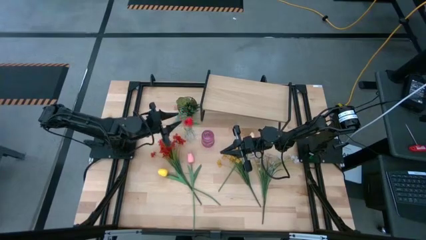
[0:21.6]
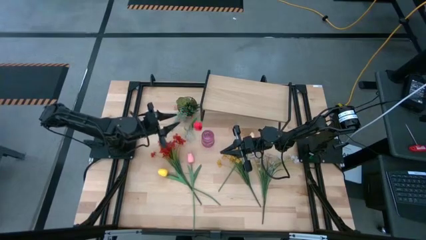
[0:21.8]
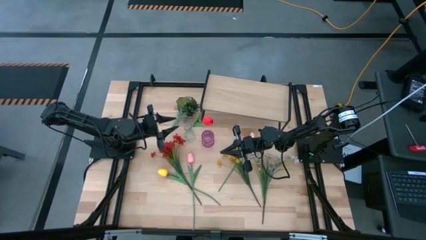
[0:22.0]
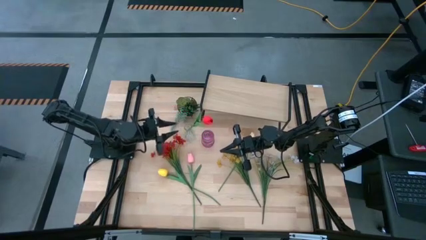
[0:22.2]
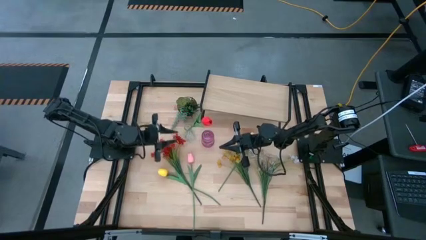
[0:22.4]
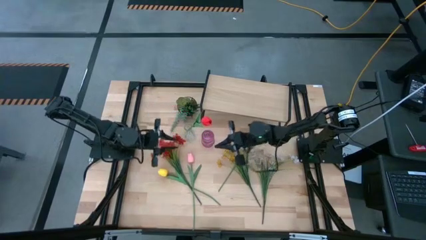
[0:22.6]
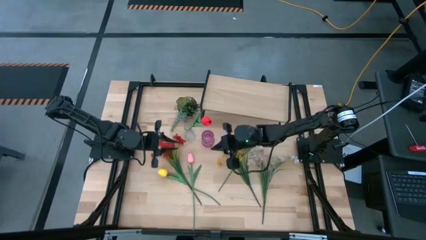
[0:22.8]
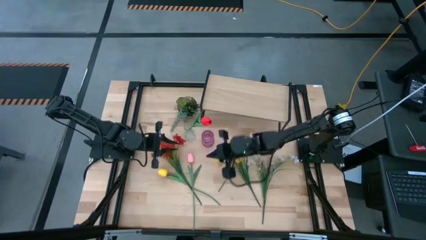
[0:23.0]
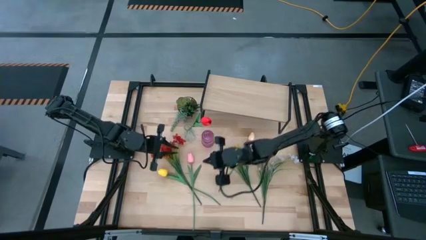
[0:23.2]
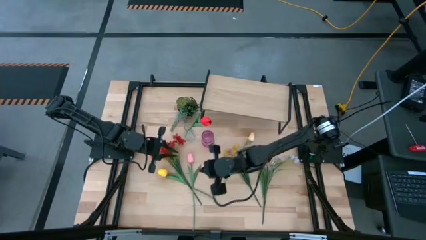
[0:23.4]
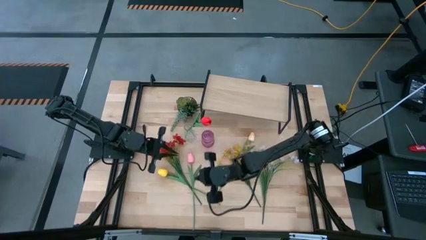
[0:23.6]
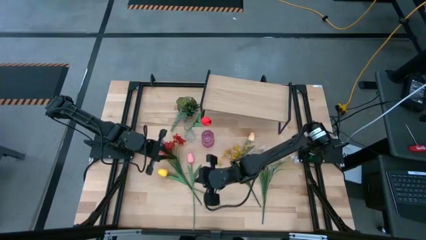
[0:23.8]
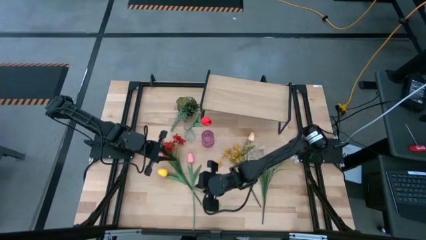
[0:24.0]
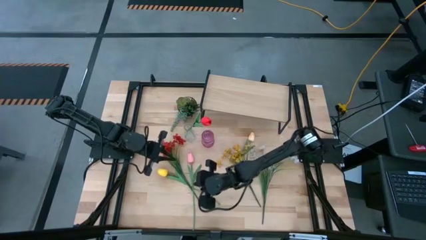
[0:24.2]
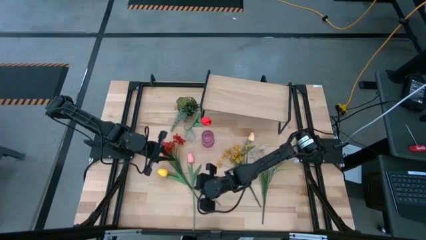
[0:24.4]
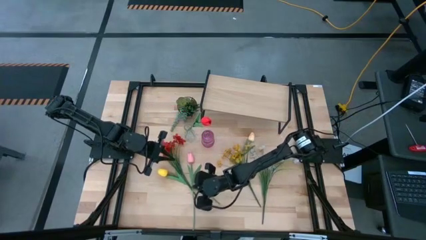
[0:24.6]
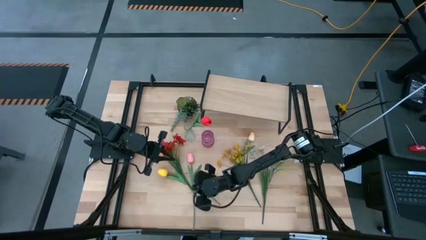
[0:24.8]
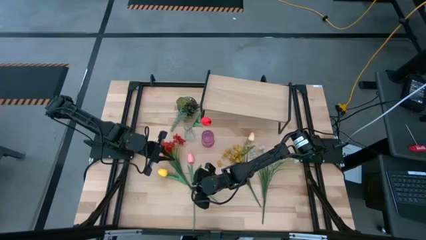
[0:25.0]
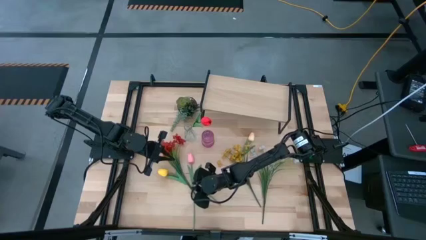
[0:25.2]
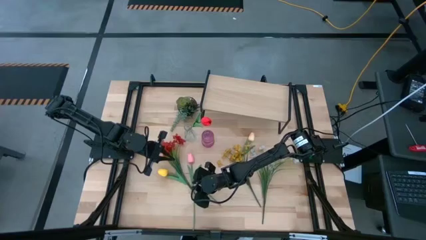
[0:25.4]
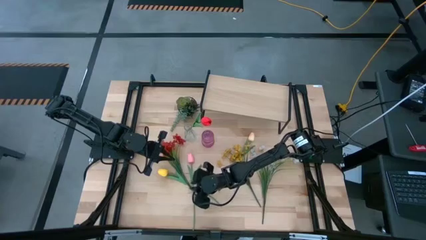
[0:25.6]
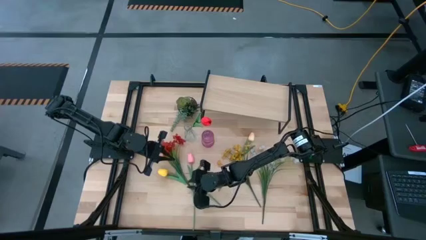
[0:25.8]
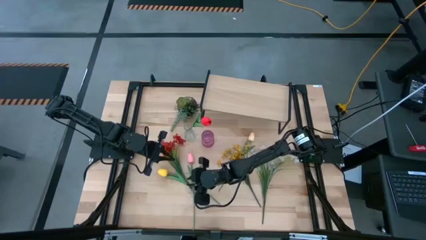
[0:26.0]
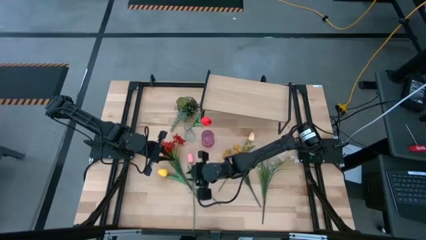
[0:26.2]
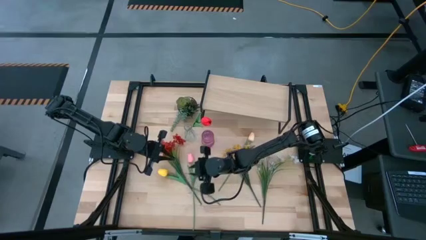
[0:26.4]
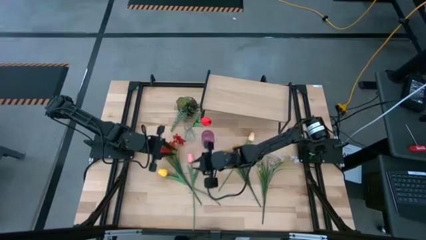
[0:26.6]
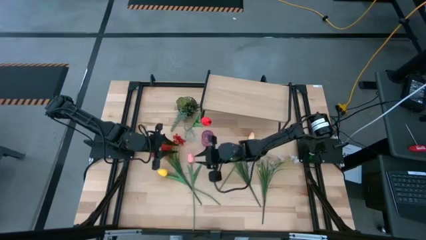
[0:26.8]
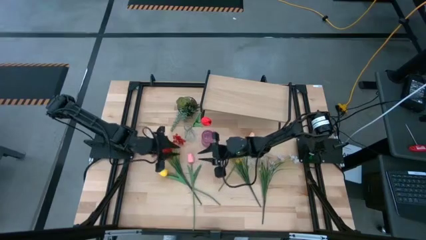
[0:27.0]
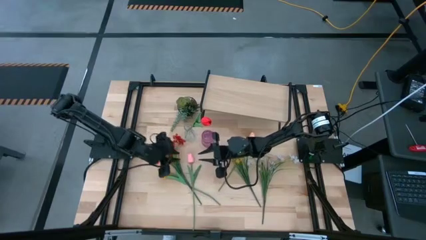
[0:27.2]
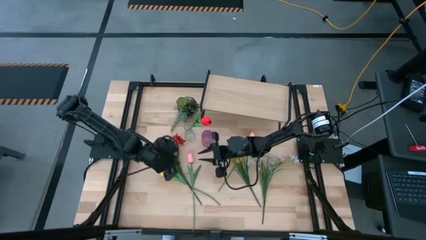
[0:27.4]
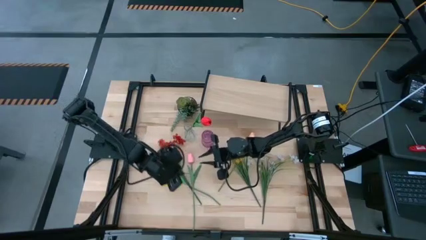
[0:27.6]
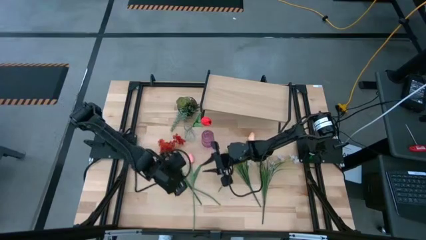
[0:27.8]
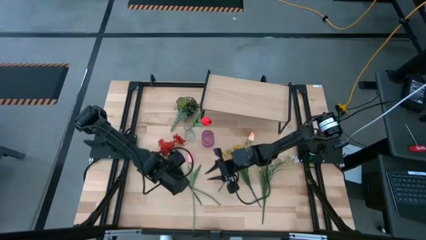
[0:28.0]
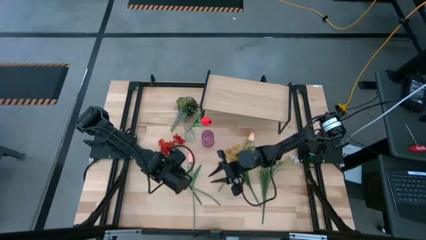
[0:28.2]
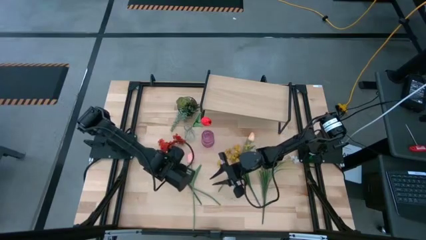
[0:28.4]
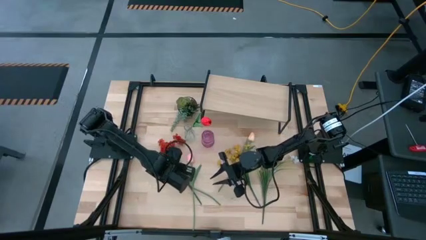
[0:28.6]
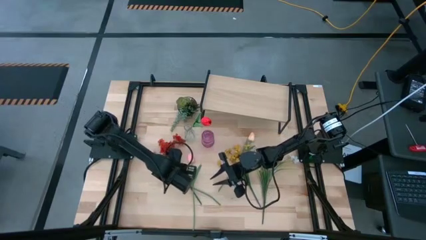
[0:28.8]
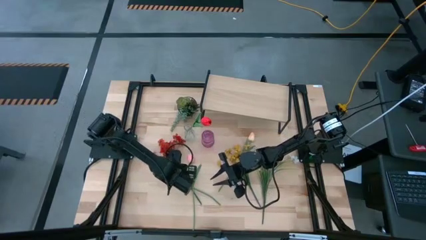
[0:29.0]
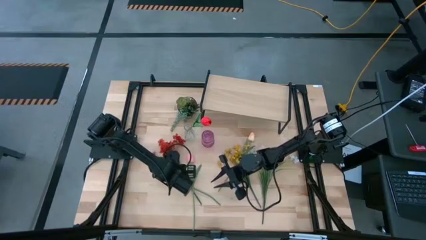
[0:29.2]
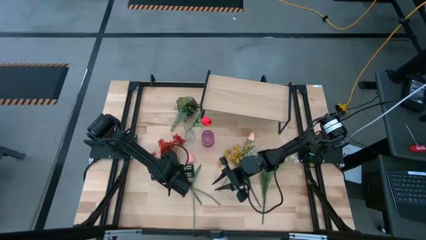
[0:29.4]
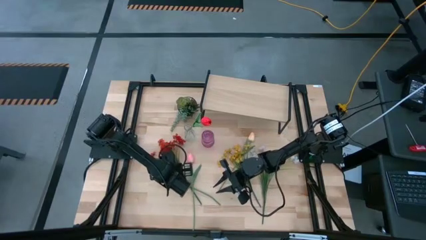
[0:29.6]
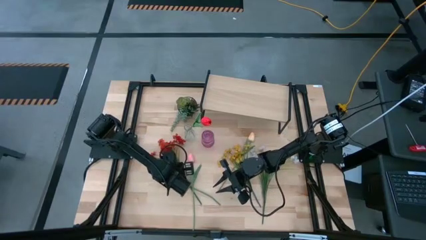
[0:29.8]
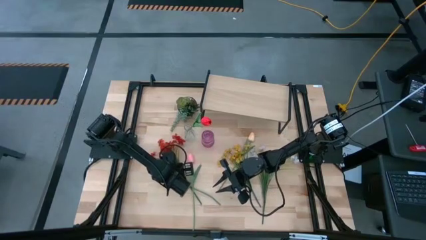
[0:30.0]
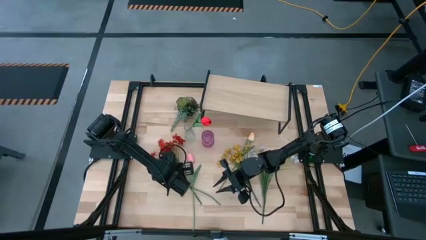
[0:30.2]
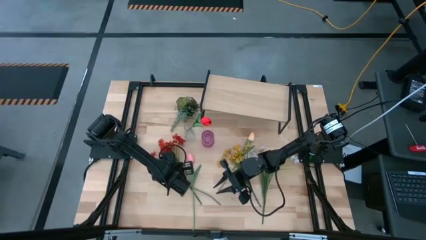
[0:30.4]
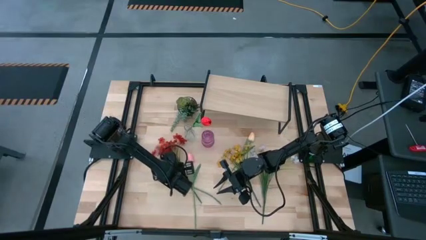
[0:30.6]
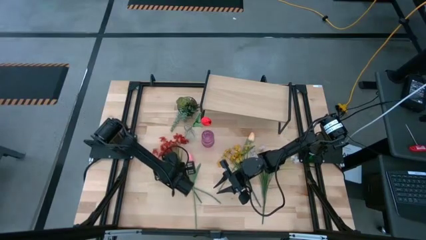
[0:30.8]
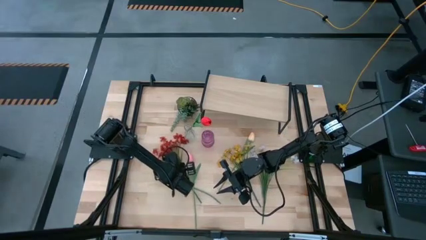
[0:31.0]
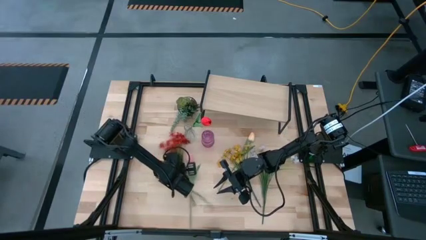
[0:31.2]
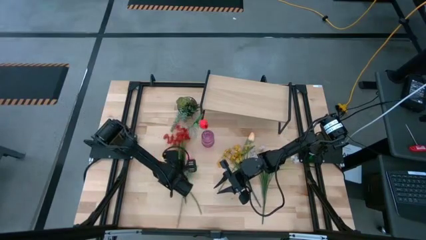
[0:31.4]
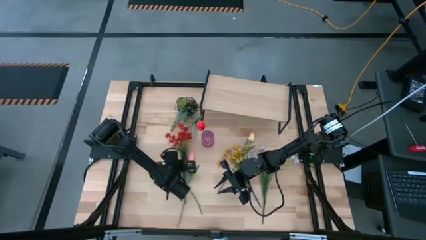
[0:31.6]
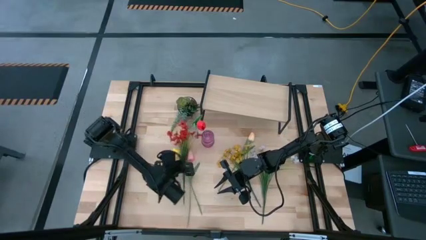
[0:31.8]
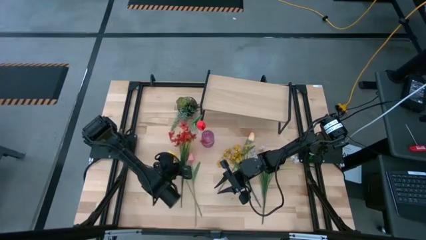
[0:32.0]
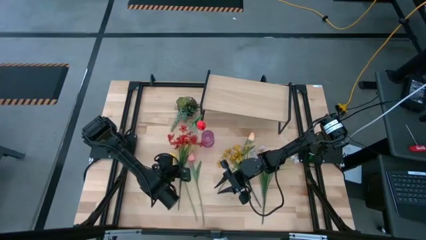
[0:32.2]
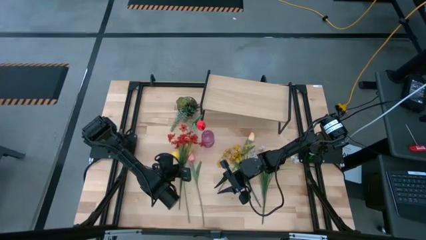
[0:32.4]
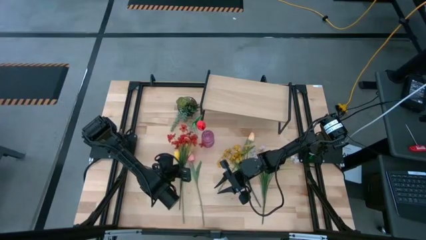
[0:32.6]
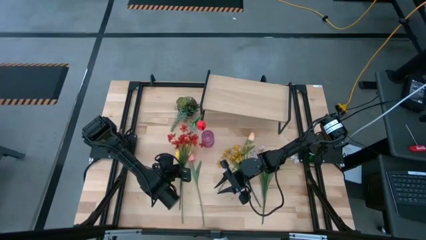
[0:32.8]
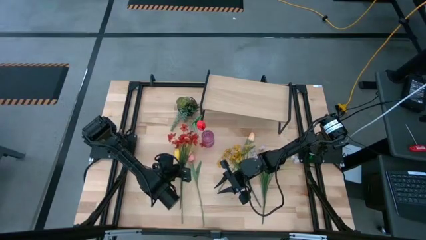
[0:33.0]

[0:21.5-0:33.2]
Task: Pick and place flowers into a vace then onto a shelf
Put the red flowers into the transparent vase
